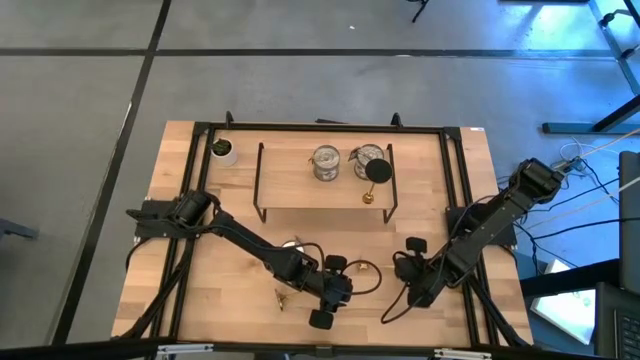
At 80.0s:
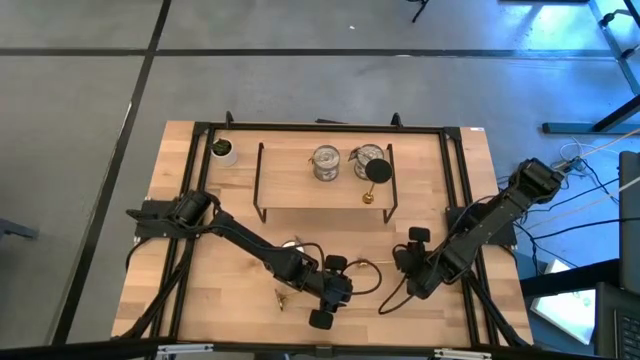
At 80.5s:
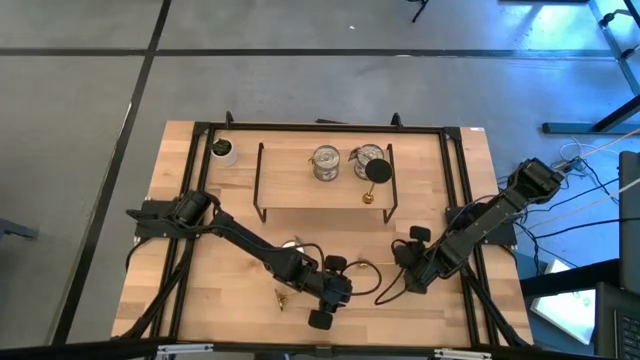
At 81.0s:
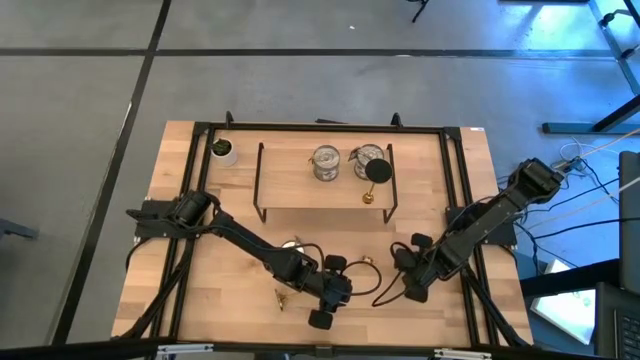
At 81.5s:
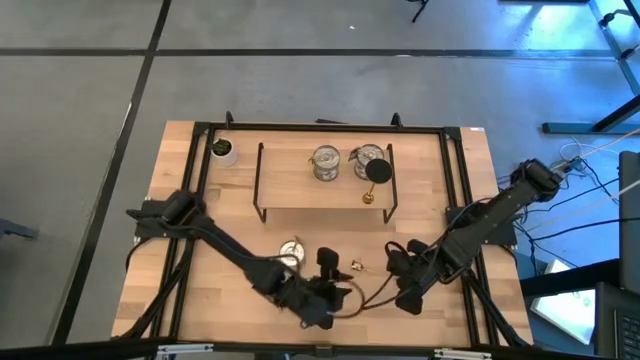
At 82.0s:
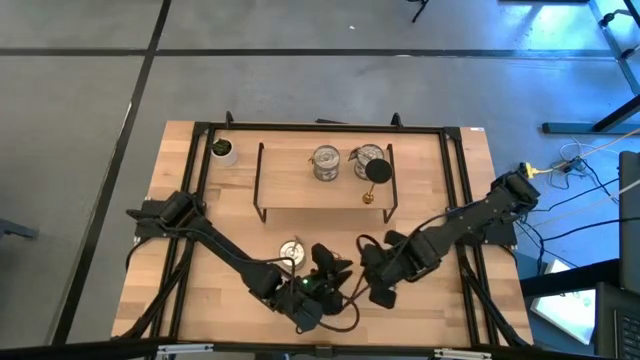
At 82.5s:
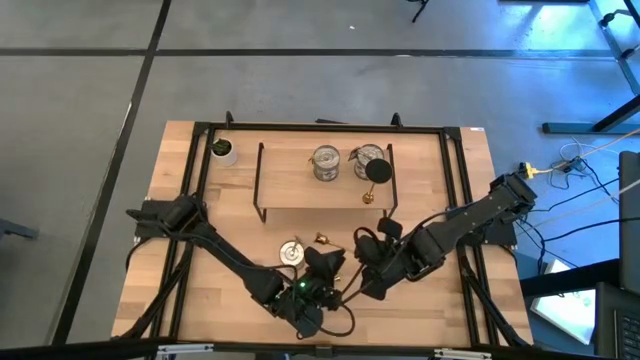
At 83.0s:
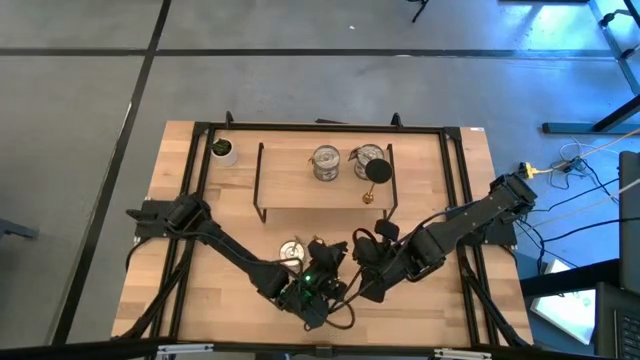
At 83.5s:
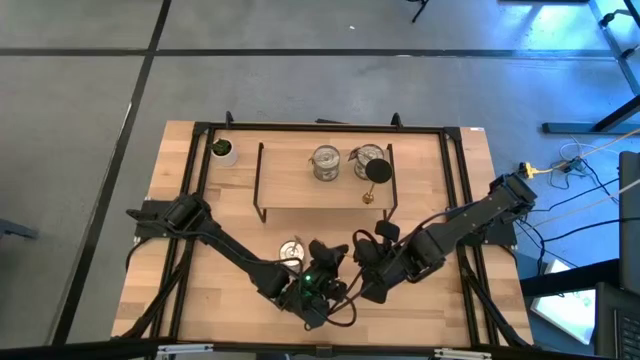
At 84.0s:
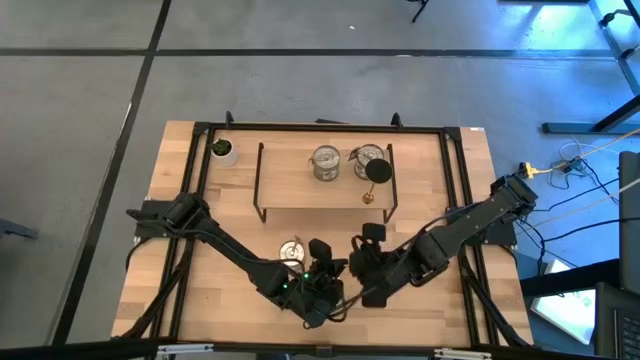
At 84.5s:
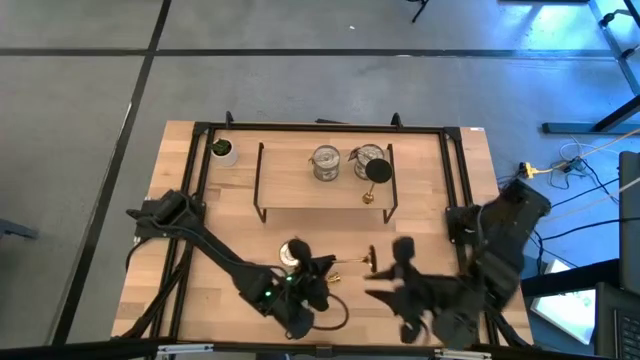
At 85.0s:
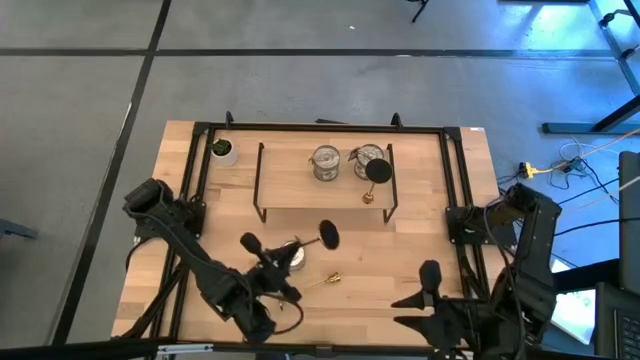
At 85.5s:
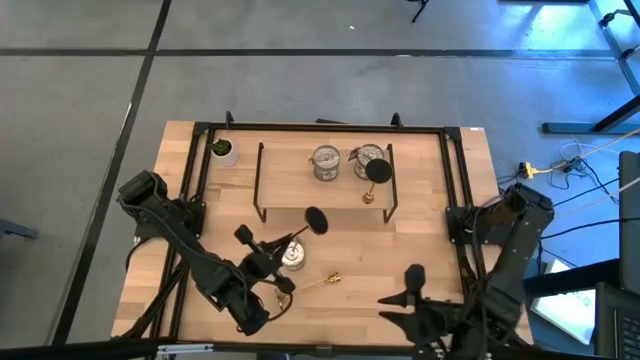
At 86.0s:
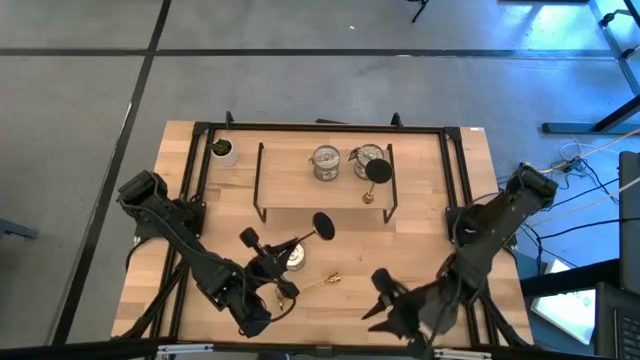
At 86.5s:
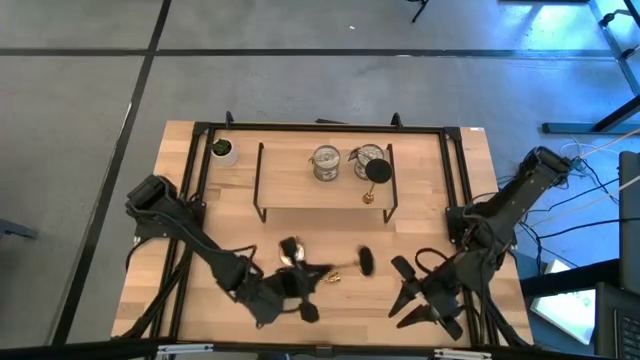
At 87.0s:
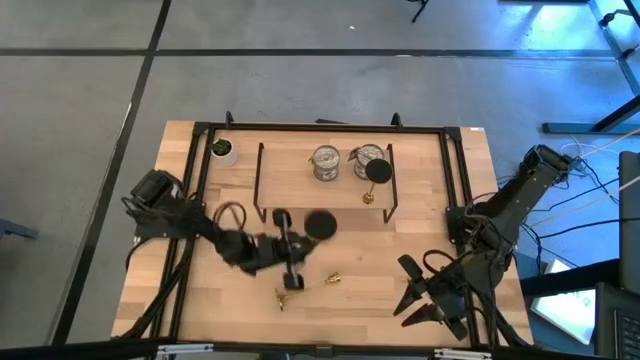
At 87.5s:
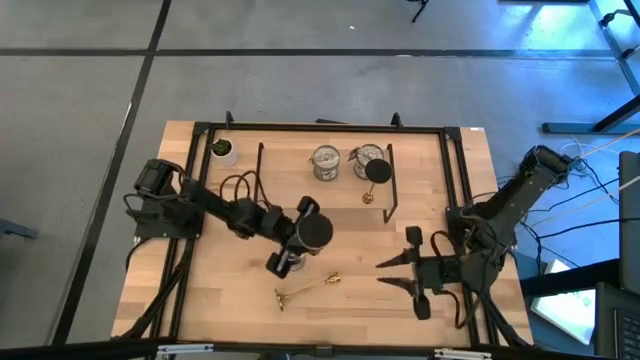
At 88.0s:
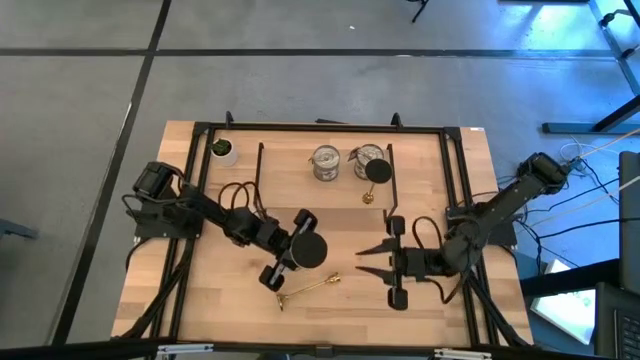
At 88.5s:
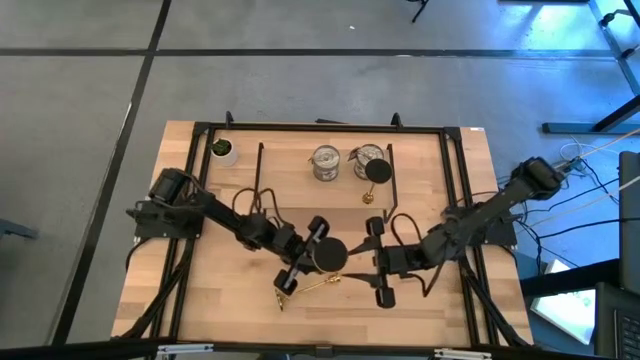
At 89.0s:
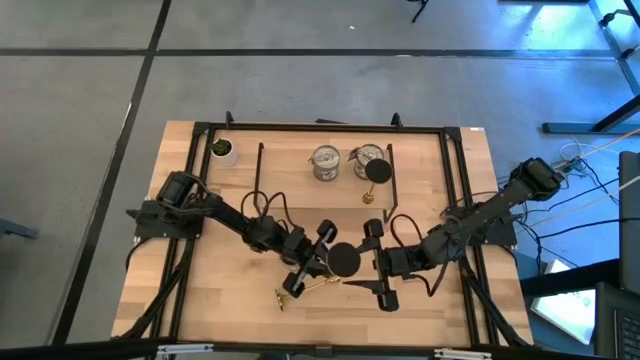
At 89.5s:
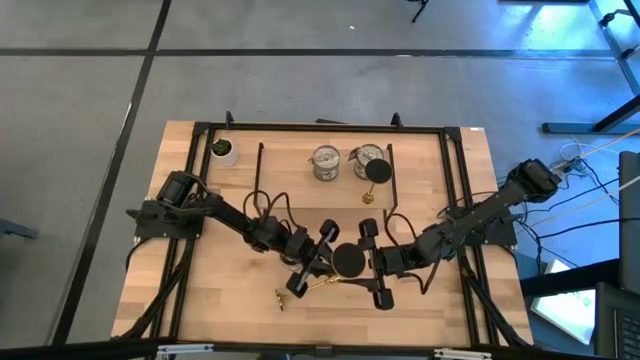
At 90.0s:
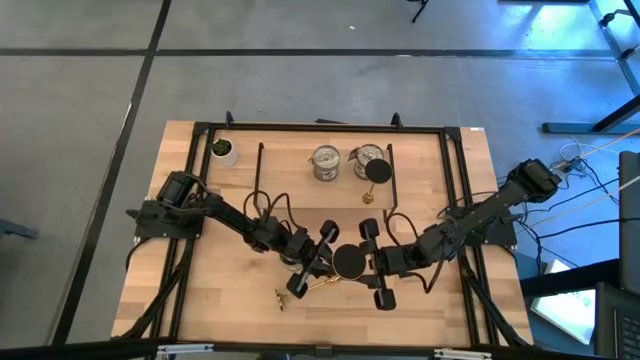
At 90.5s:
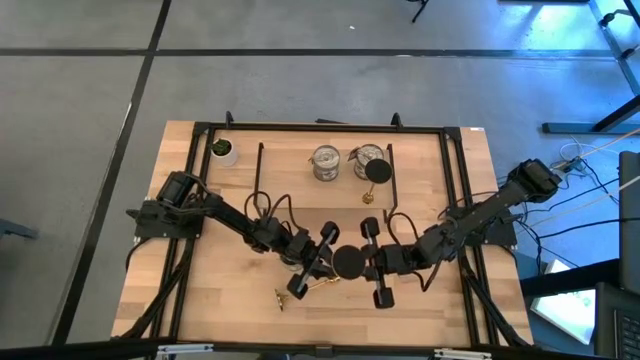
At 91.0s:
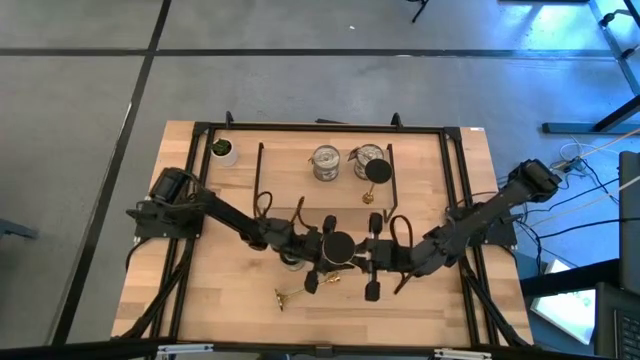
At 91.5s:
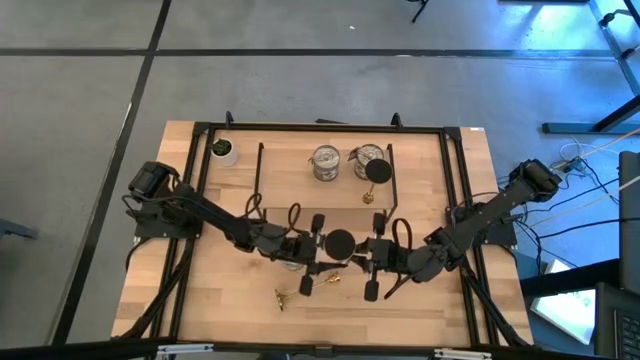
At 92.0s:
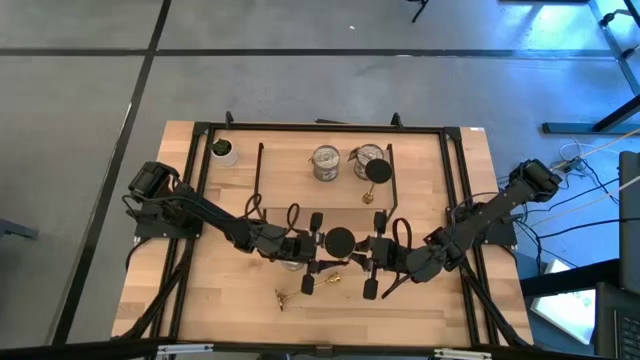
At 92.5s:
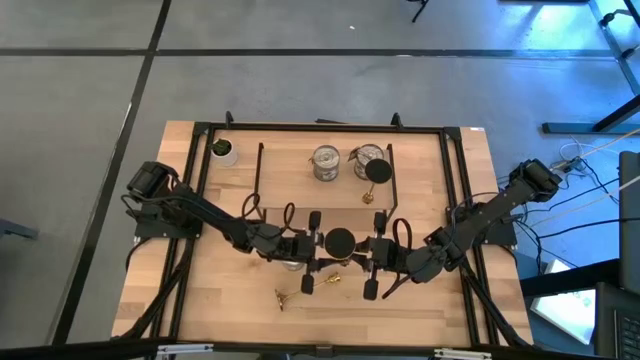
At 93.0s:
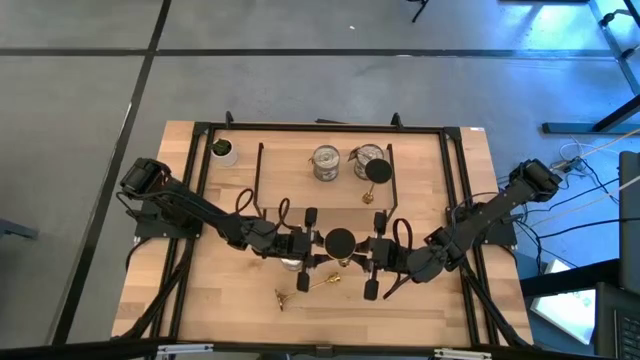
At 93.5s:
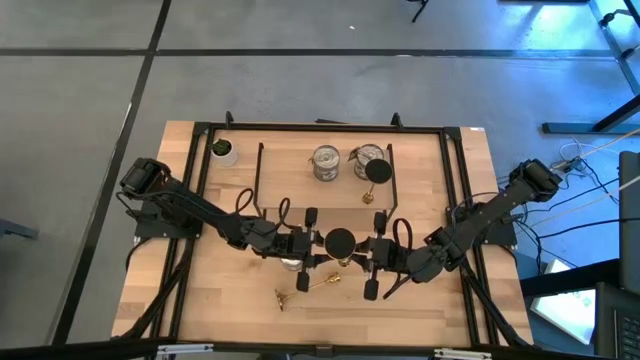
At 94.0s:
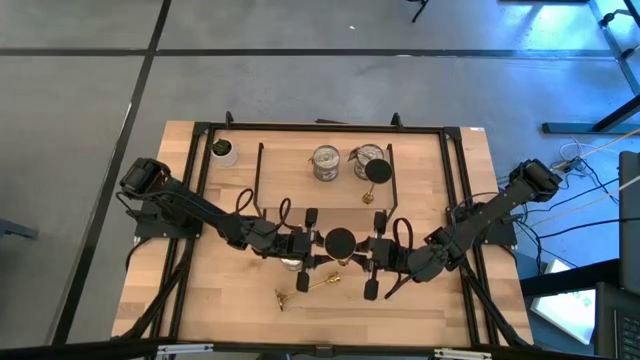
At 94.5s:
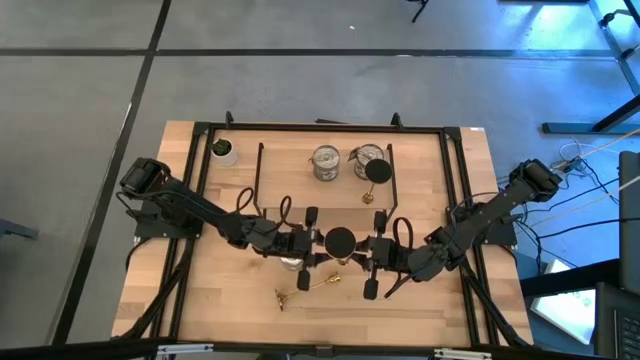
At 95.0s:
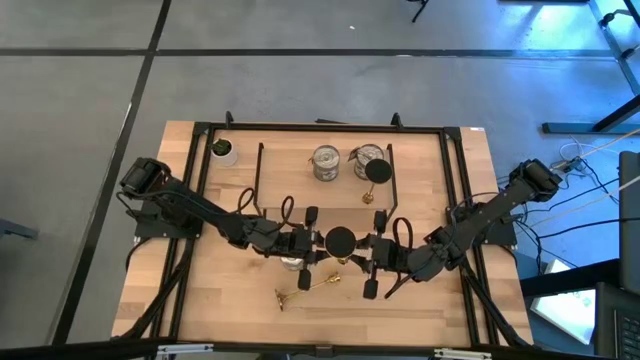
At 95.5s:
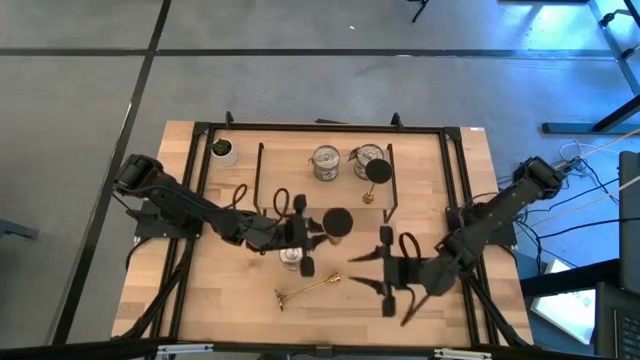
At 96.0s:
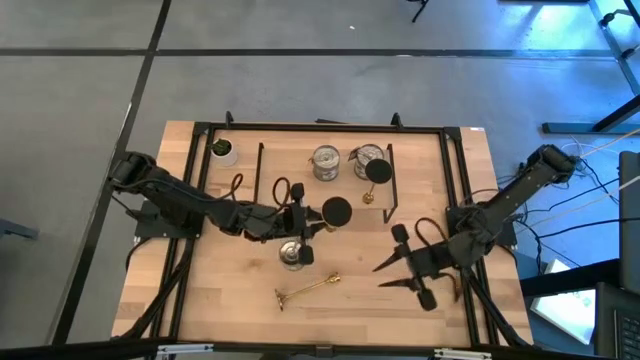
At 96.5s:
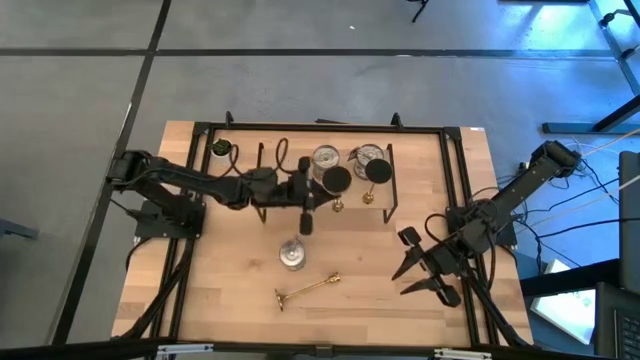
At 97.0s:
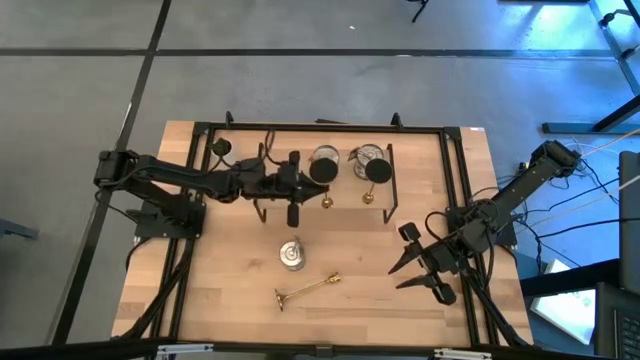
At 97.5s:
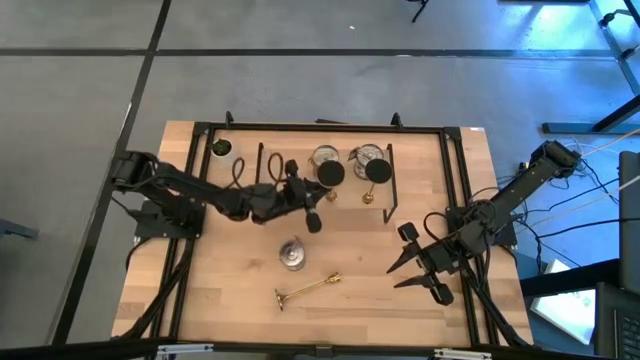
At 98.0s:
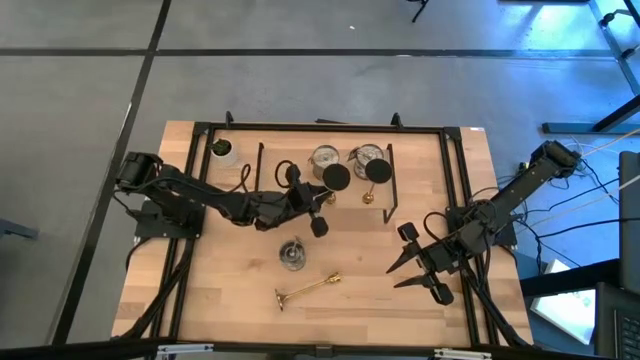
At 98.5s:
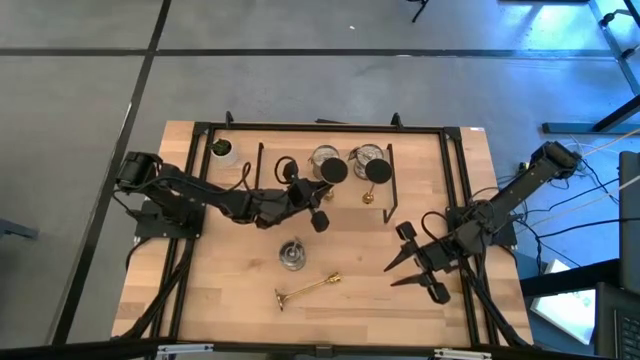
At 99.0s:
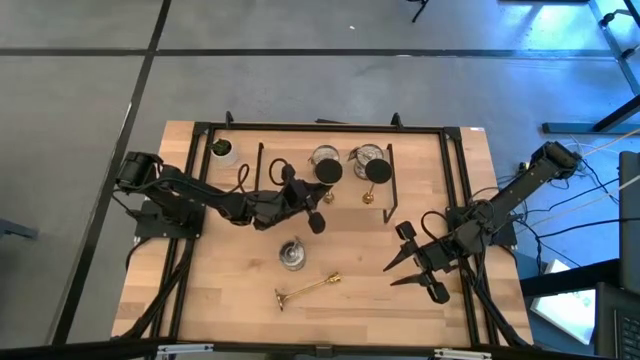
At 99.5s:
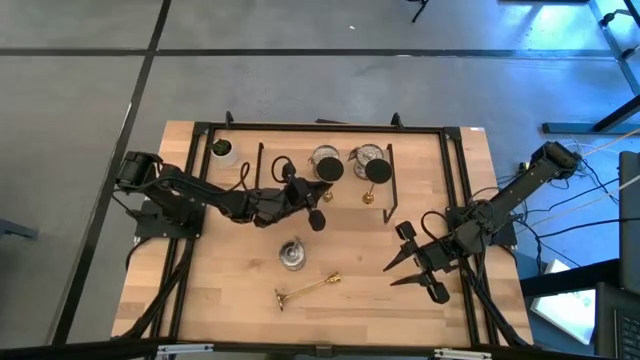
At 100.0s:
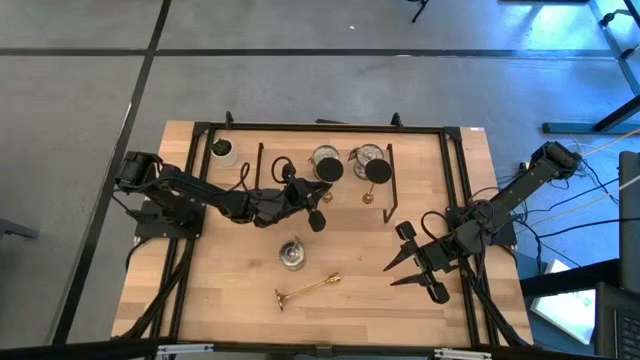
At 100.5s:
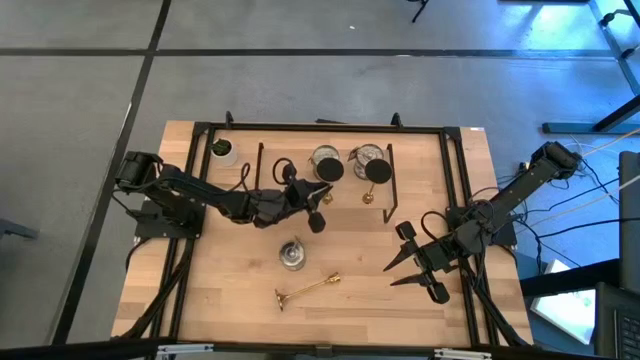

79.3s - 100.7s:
Task: Pick & Place candle stick holders
Put the right gold candle holder on the shelf
